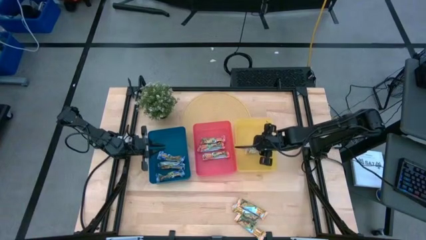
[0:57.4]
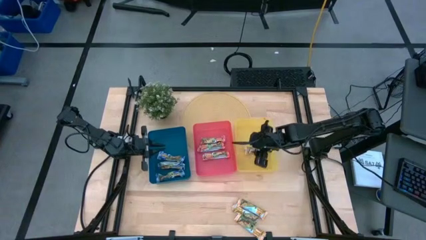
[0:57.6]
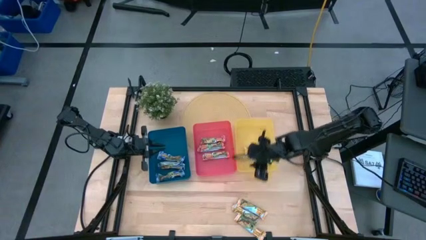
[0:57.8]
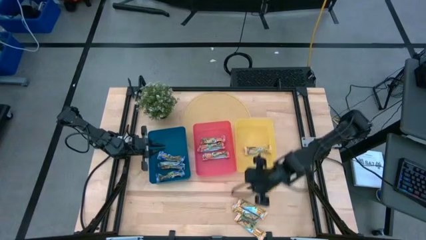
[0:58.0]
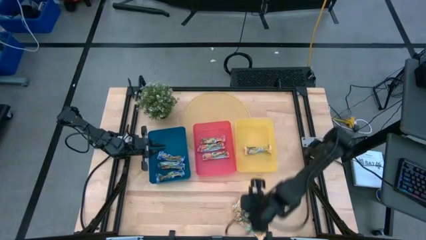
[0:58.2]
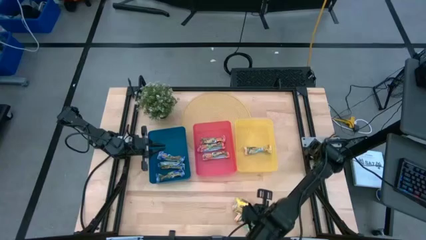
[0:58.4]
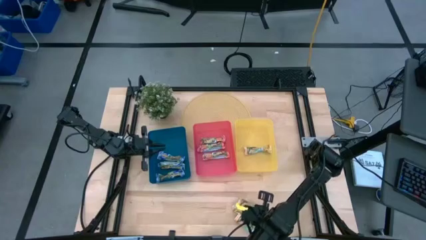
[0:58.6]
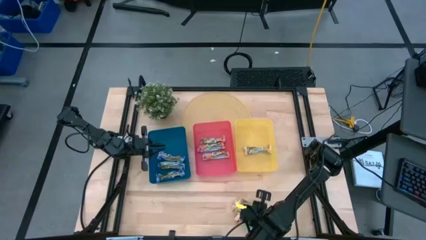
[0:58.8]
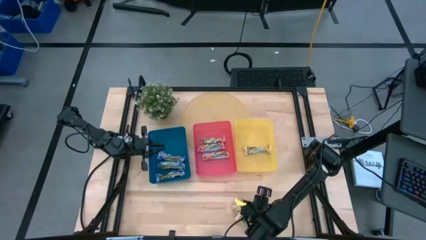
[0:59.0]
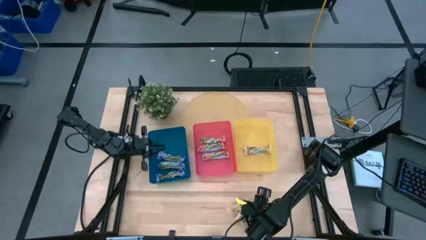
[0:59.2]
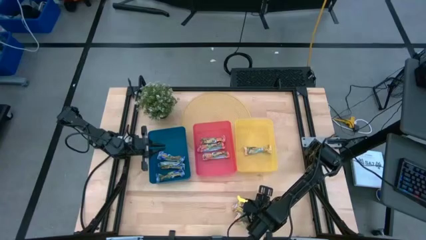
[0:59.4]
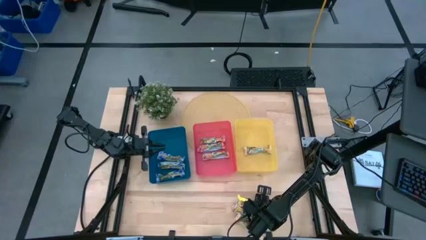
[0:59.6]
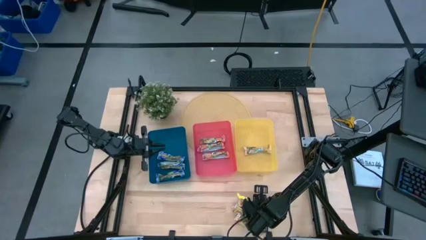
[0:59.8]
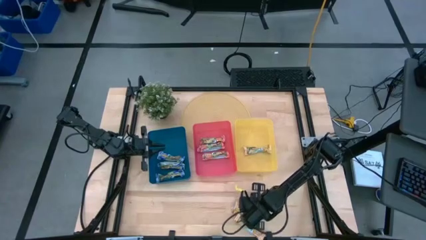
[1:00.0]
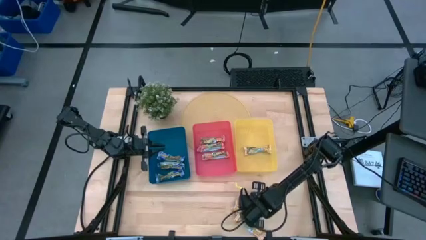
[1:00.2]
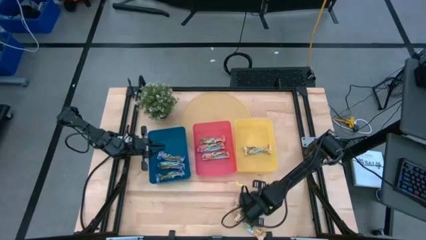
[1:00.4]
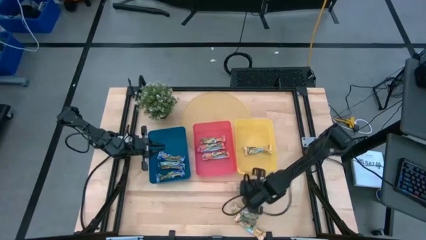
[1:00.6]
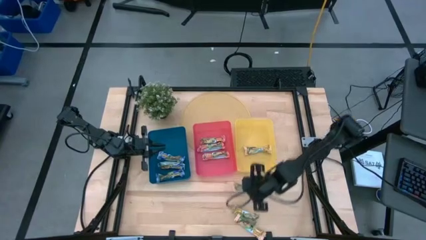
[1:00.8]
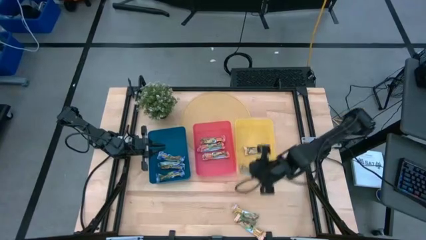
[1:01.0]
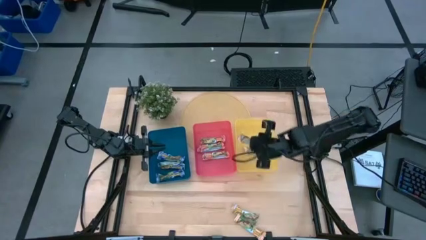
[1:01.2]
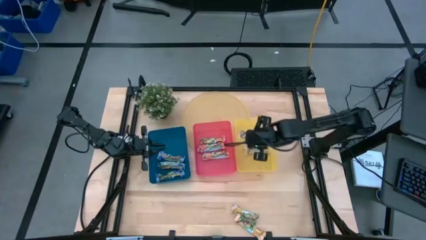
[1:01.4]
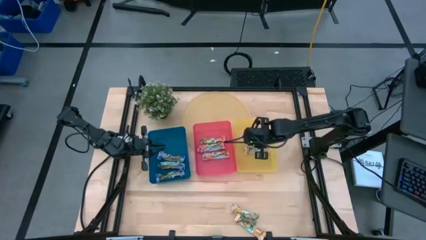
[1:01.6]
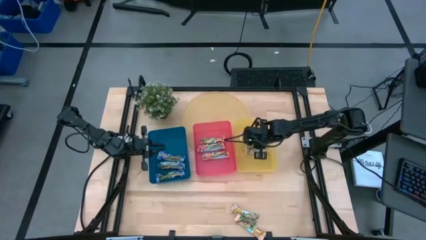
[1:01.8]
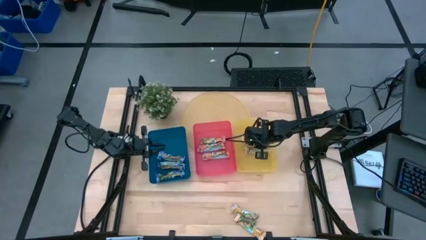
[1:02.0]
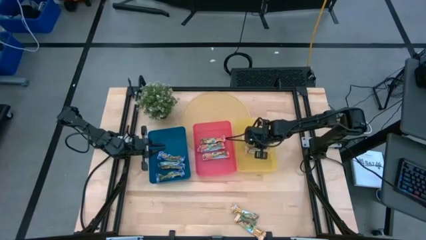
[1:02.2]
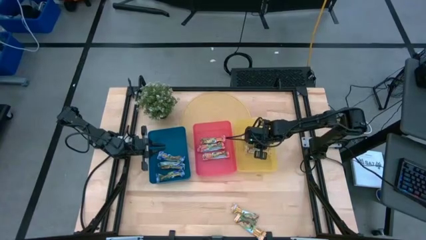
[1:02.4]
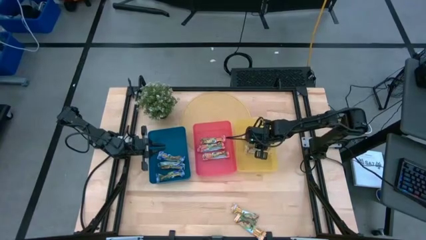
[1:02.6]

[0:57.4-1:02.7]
Task: Pick and place Granola Bars by type
Put the yellow granola bar into the yellow bin

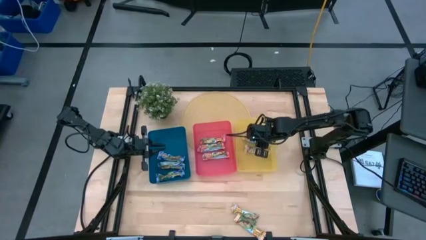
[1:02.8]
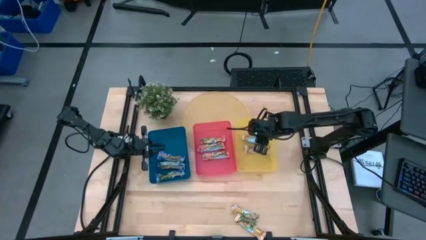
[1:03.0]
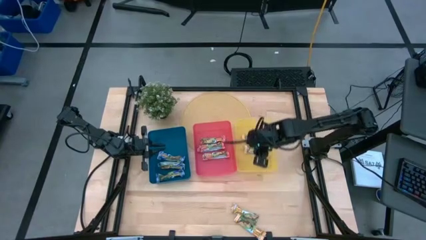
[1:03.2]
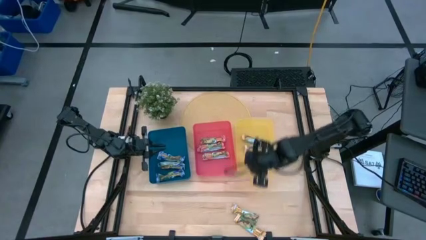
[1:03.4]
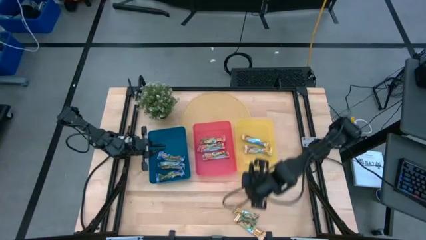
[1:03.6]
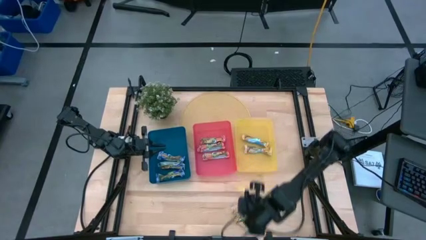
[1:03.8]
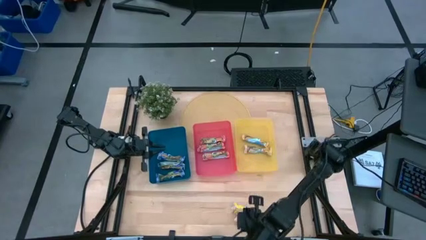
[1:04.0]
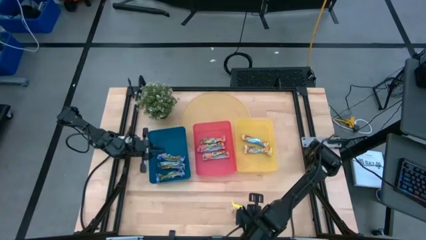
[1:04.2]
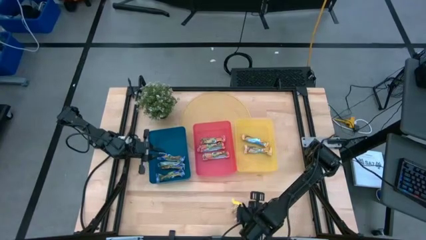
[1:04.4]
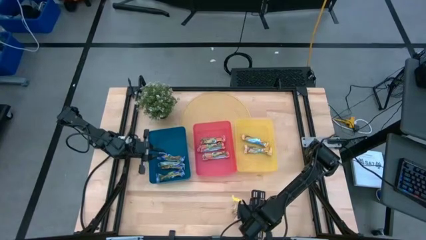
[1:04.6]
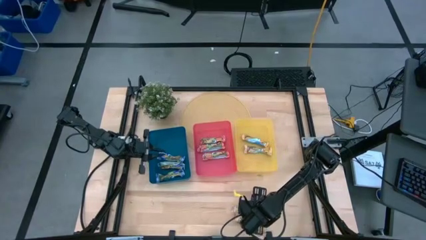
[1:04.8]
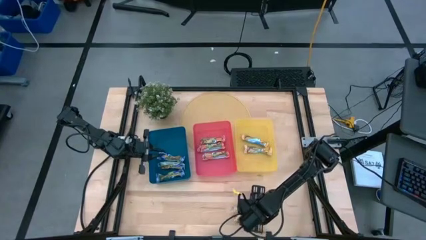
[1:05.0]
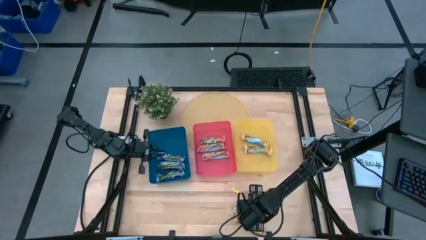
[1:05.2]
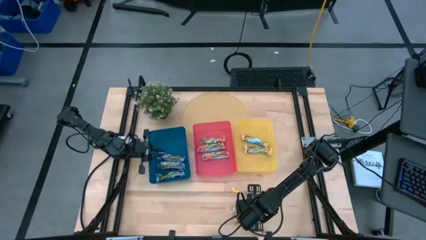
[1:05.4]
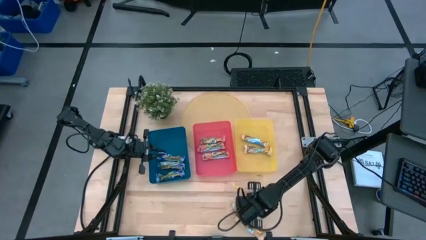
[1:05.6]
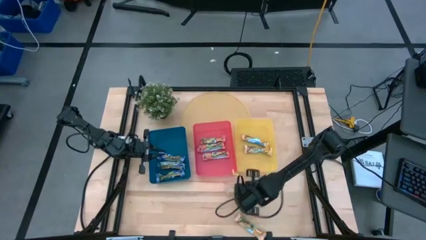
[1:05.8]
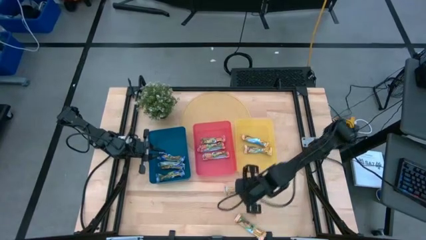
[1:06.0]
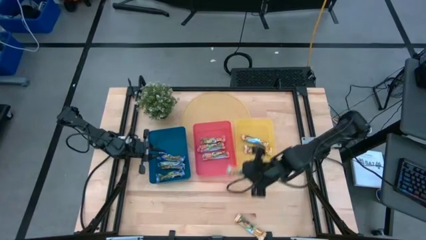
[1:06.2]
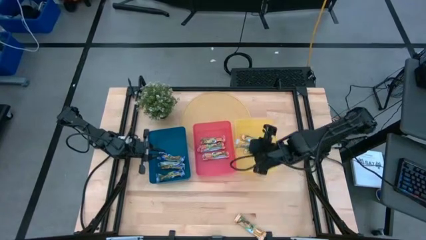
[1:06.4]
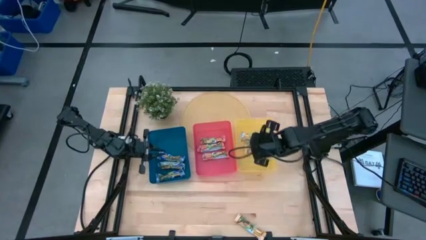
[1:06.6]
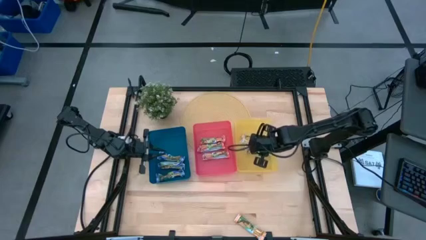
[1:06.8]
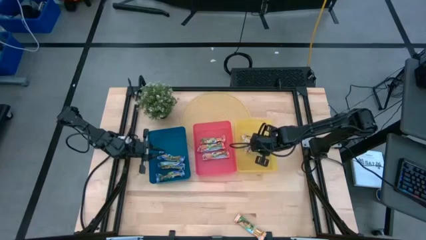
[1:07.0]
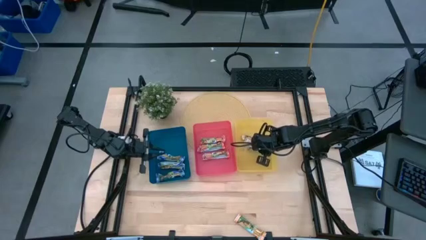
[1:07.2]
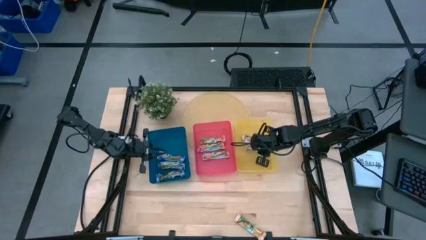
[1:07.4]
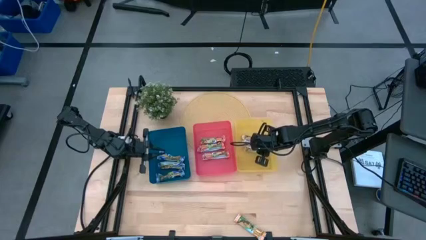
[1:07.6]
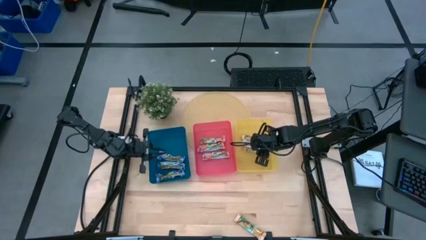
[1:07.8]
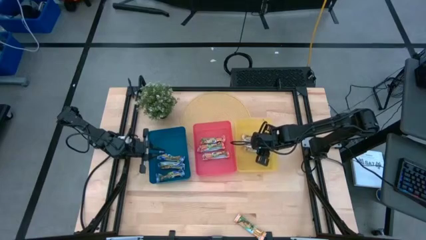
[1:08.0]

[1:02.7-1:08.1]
Put the yellow granola bar into the yellow bin

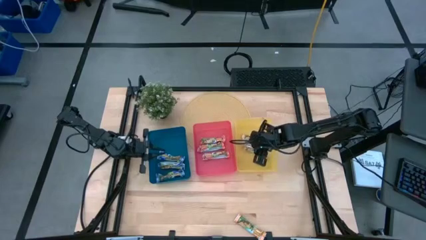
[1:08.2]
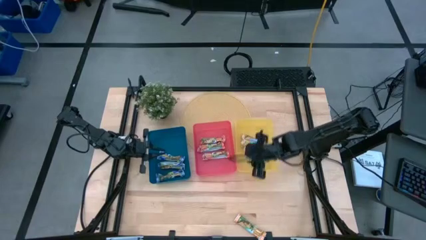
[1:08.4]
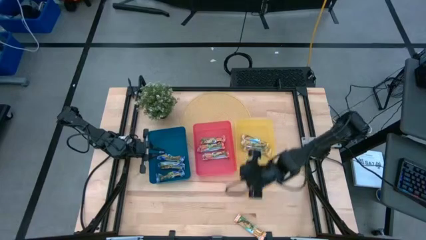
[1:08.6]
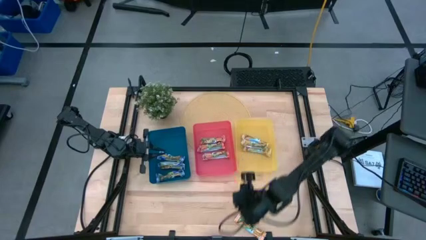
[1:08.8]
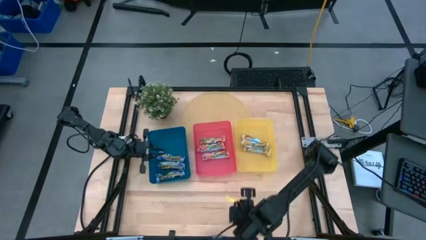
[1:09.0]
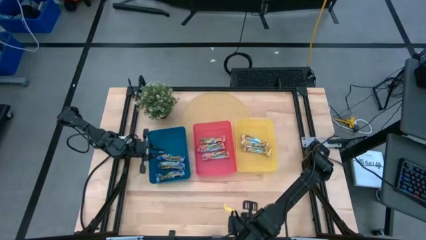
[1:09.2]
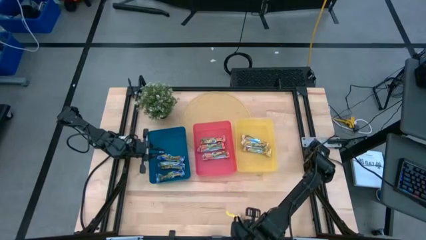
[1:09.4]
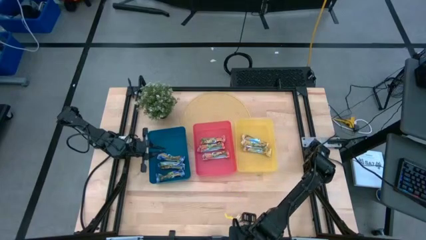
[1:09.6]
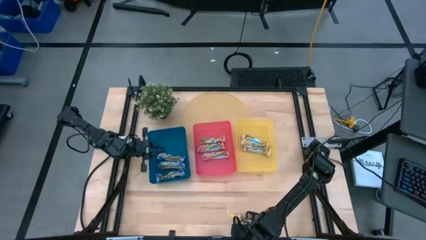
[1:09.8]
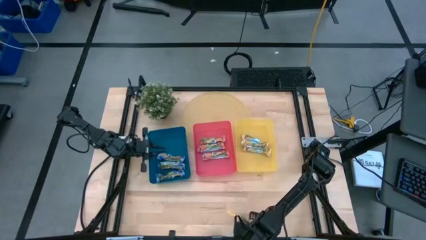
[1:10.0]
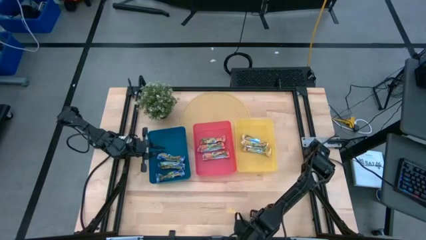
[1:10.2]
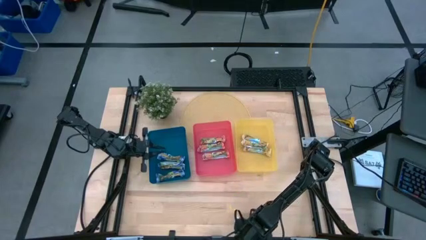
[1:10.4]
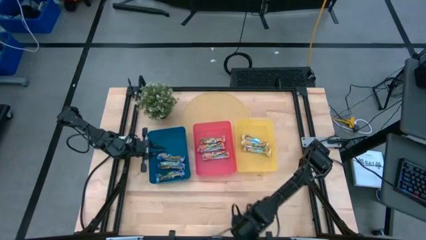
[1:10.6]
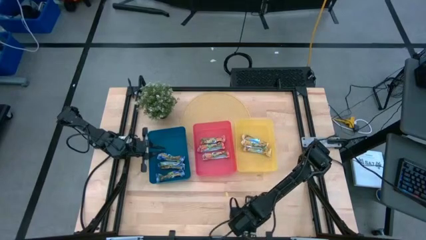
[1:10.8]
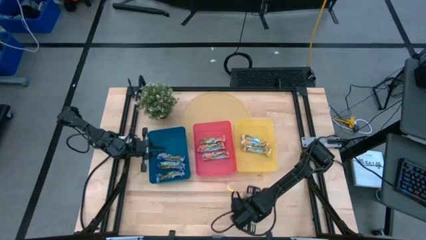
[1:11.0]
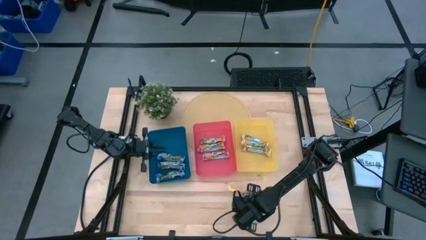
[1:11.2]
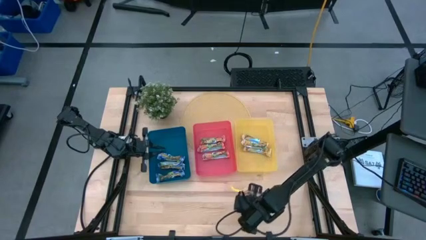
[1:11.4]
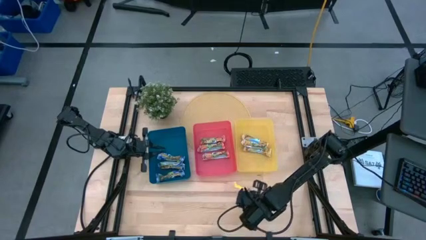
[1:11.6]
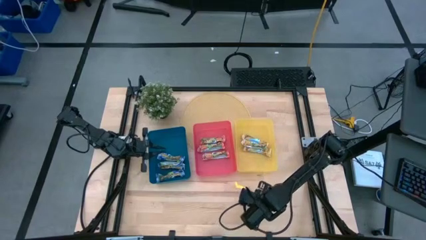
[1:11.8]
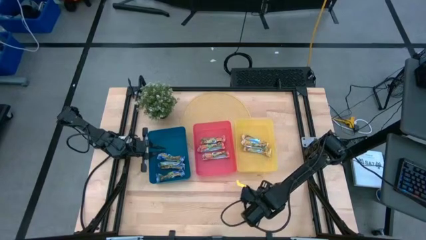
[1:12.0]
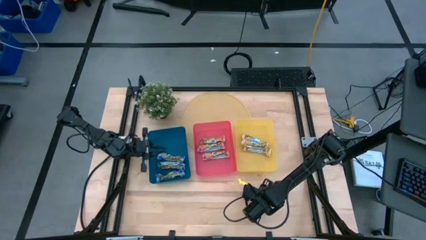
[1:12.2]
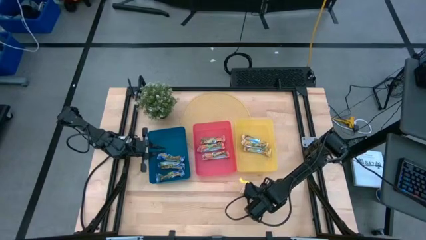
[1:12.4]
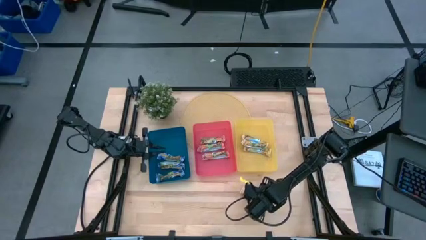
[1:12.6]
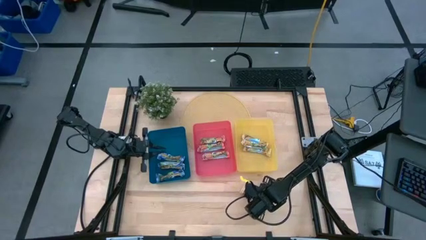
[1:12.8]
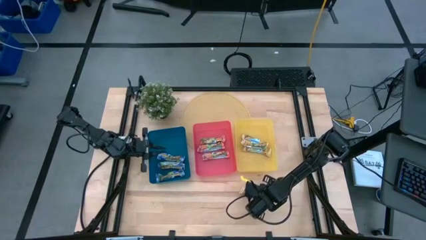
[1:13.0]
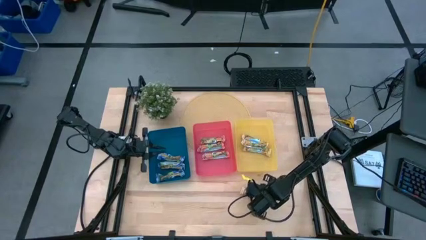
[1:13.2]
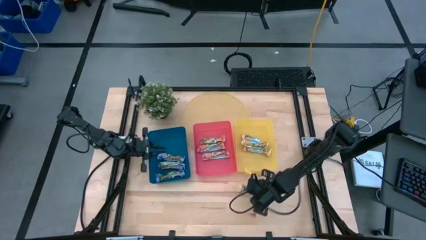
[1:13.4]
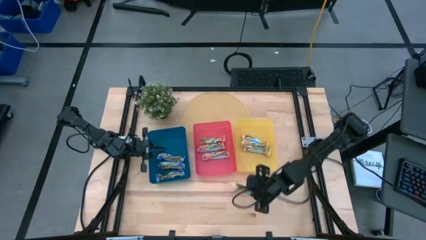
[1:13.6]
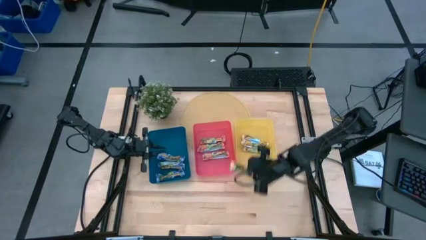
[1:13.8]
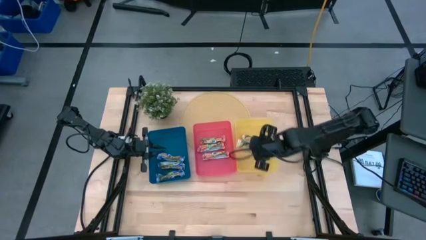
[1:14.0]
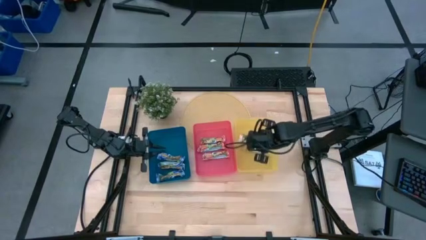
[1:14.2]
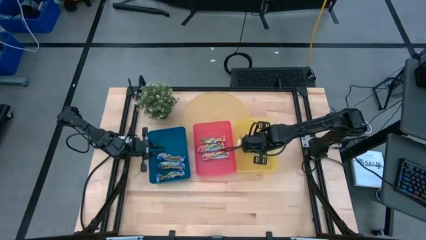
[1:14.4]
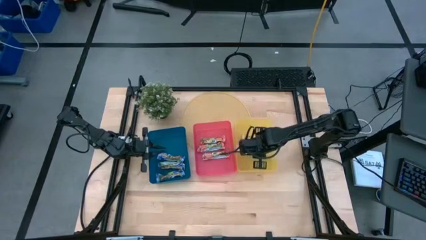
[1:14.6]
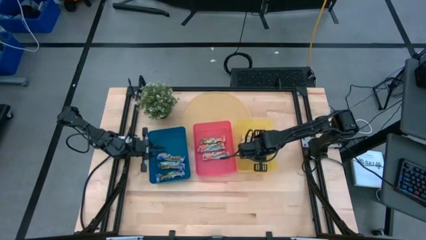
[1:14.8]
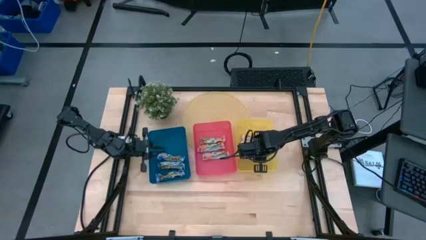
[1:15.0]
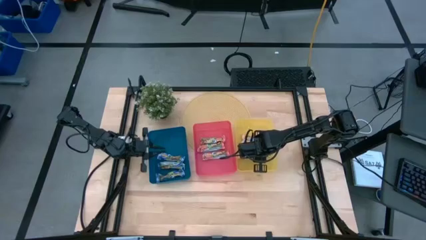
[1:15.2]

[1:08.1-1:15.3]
Put the yellow granola bar into the yellow bin
